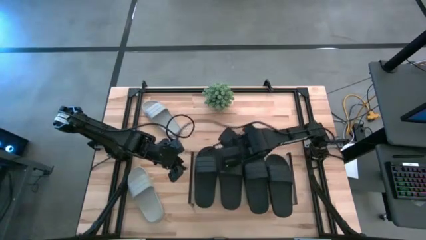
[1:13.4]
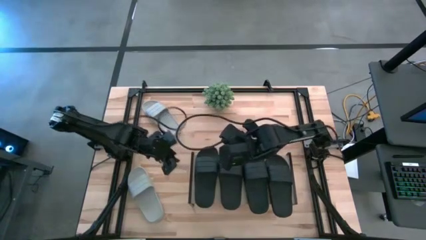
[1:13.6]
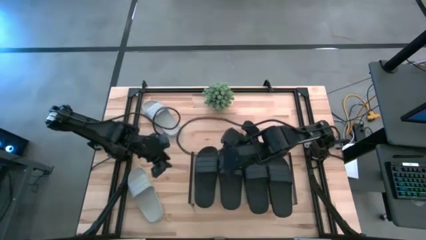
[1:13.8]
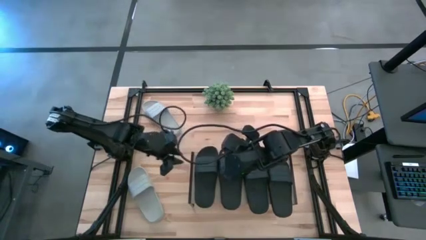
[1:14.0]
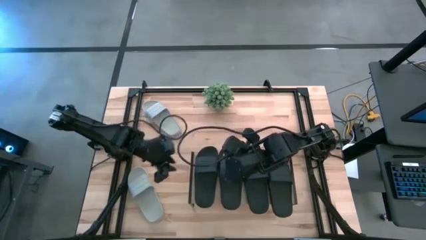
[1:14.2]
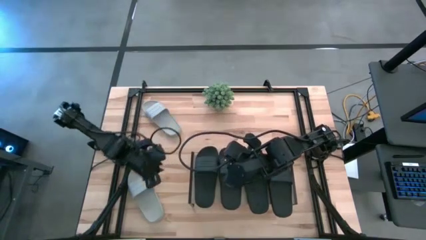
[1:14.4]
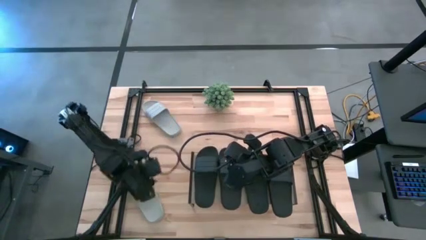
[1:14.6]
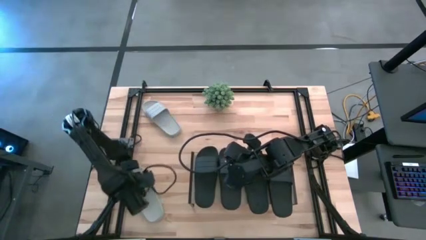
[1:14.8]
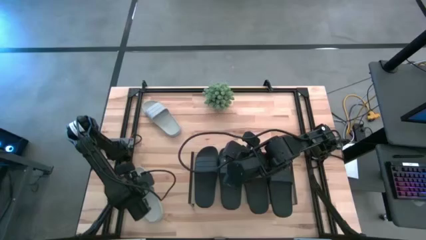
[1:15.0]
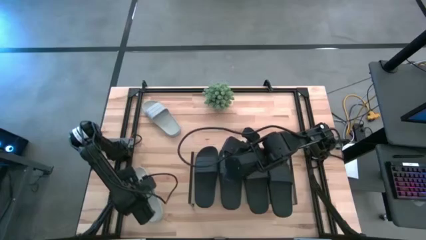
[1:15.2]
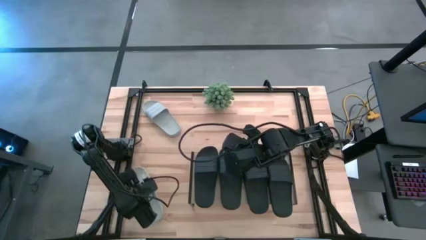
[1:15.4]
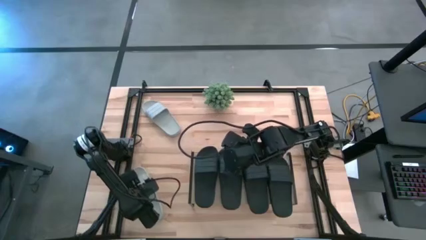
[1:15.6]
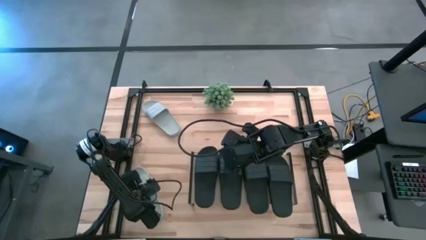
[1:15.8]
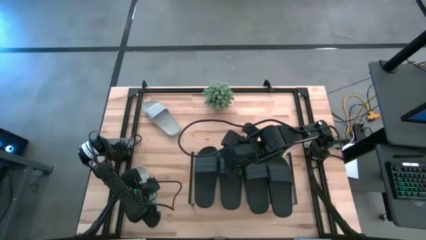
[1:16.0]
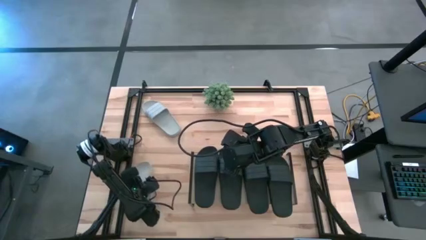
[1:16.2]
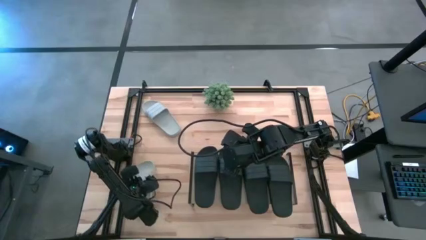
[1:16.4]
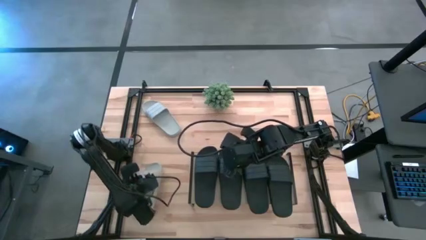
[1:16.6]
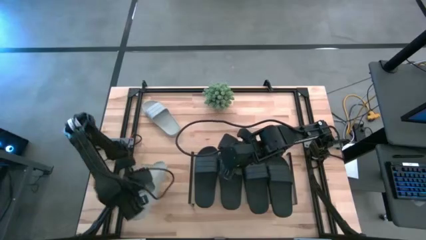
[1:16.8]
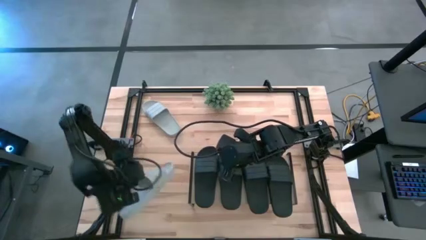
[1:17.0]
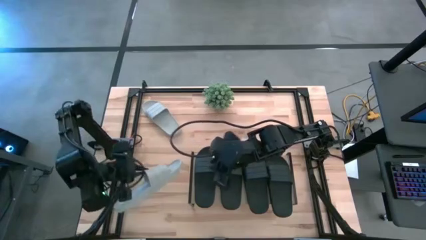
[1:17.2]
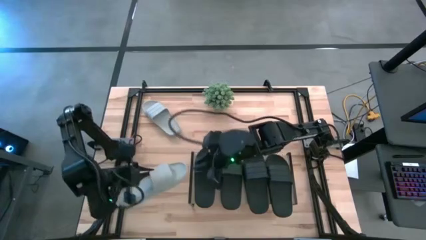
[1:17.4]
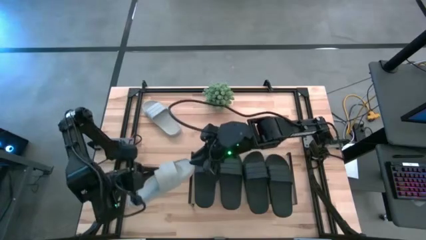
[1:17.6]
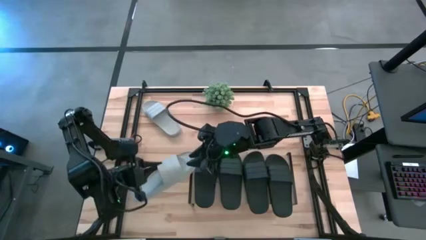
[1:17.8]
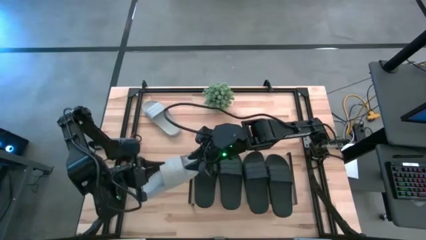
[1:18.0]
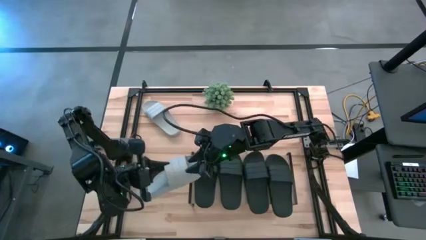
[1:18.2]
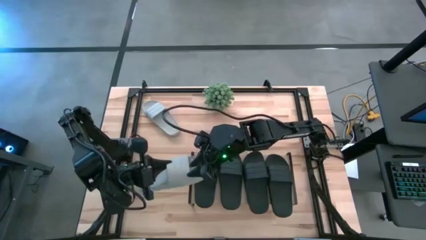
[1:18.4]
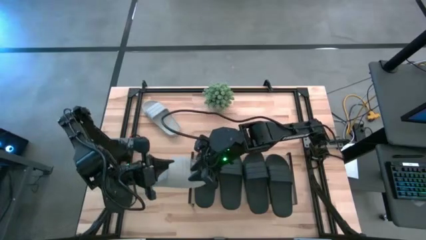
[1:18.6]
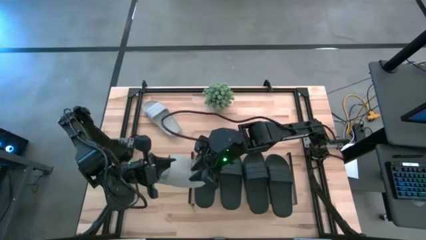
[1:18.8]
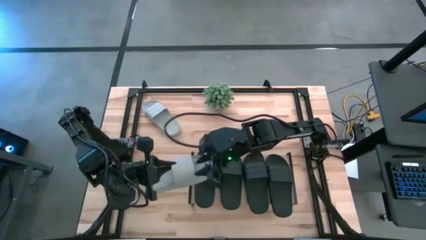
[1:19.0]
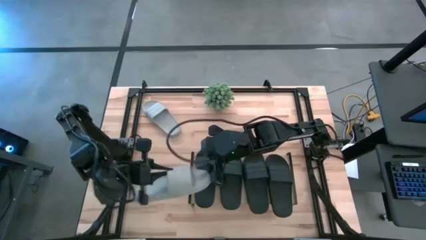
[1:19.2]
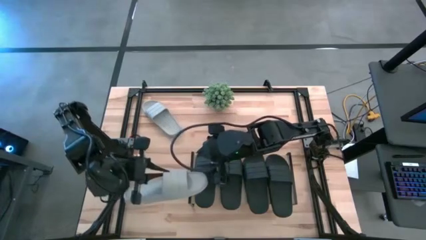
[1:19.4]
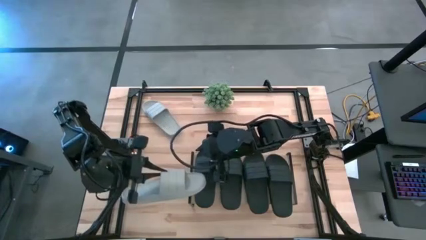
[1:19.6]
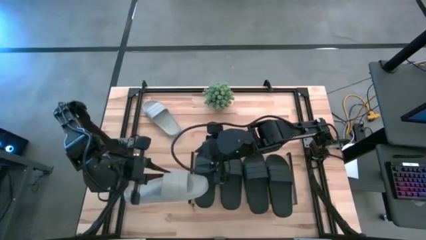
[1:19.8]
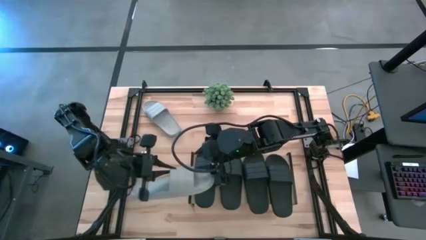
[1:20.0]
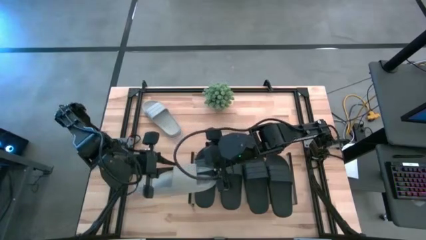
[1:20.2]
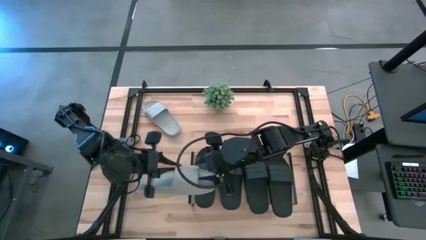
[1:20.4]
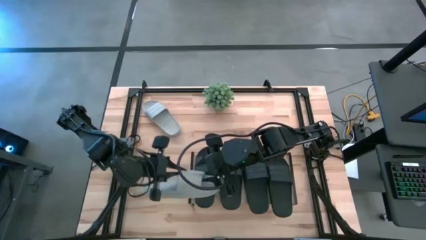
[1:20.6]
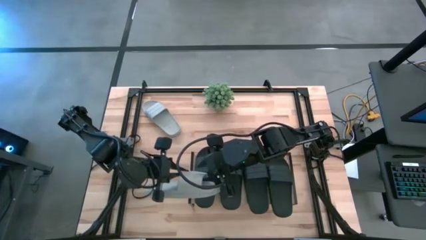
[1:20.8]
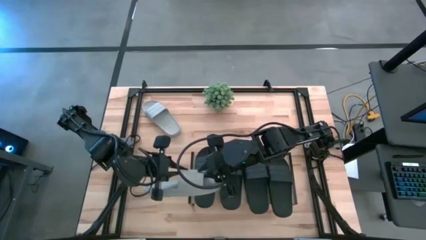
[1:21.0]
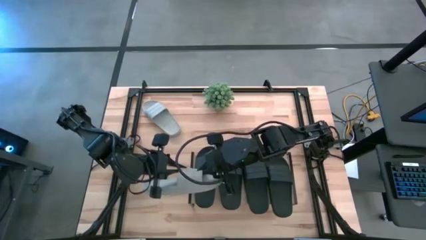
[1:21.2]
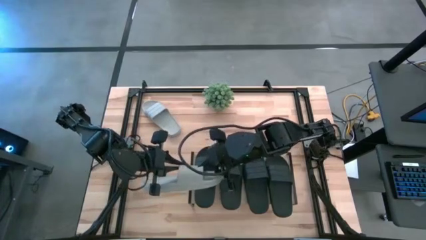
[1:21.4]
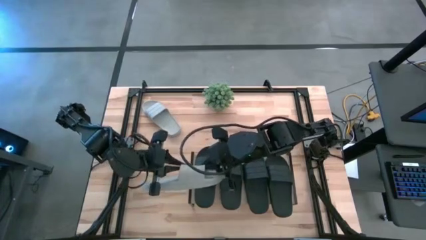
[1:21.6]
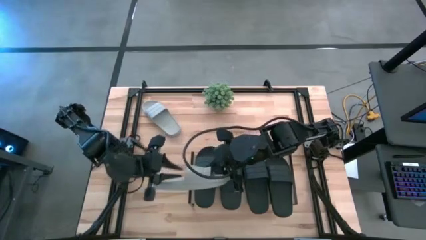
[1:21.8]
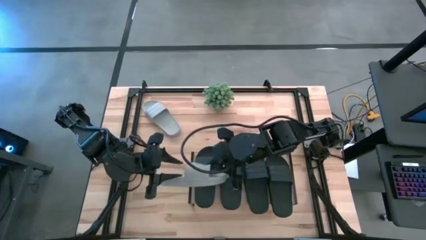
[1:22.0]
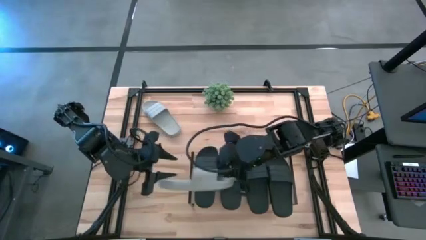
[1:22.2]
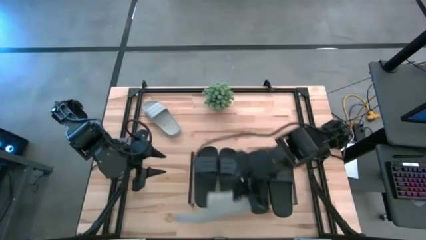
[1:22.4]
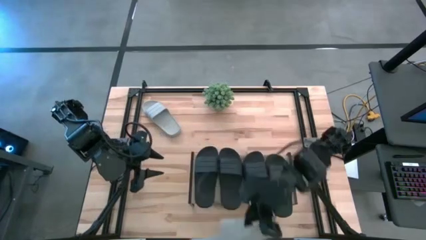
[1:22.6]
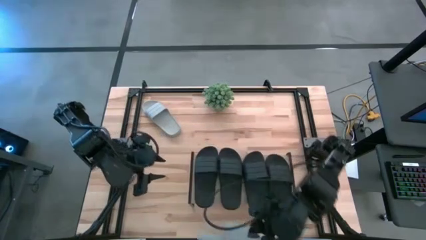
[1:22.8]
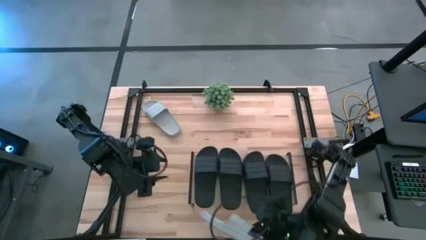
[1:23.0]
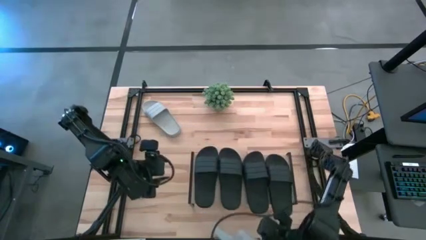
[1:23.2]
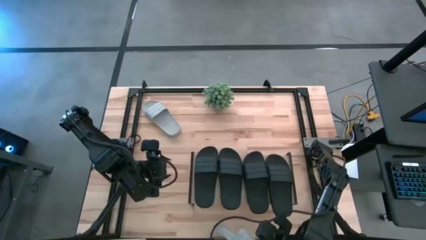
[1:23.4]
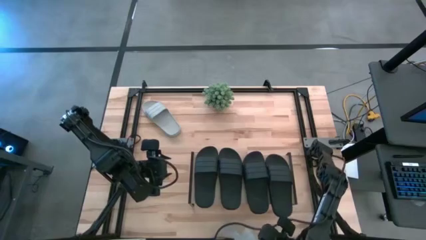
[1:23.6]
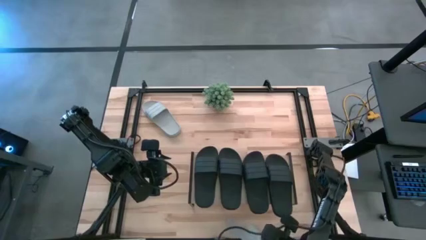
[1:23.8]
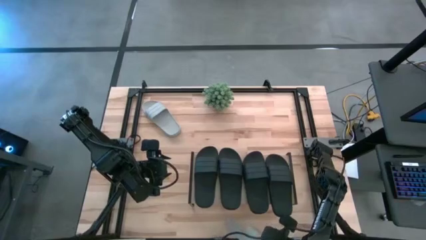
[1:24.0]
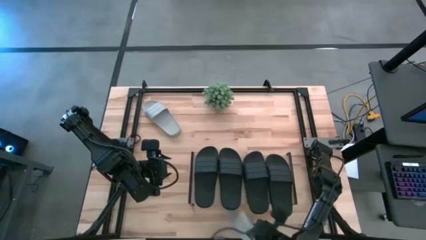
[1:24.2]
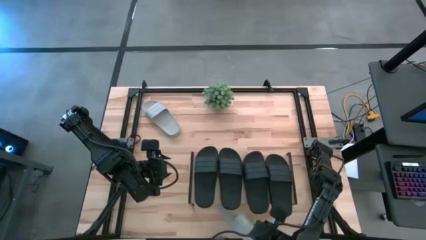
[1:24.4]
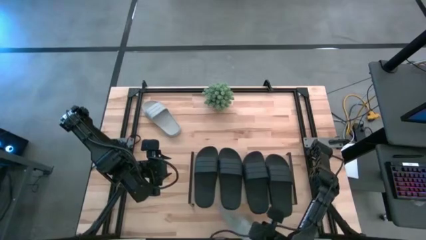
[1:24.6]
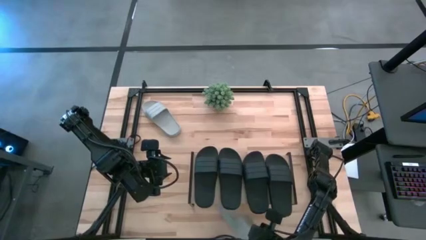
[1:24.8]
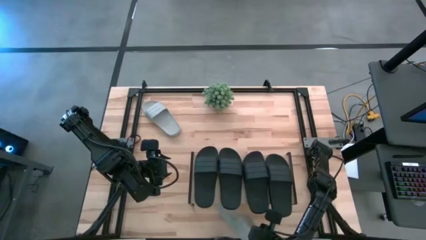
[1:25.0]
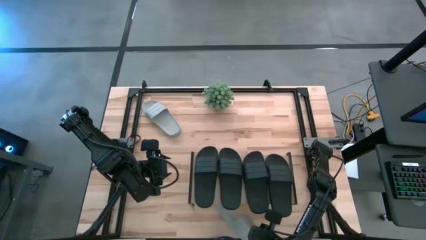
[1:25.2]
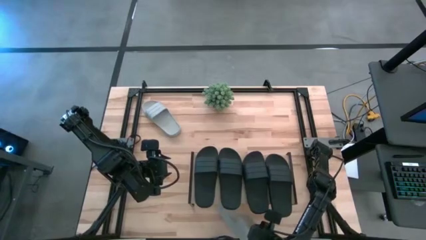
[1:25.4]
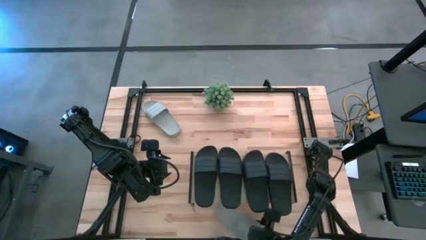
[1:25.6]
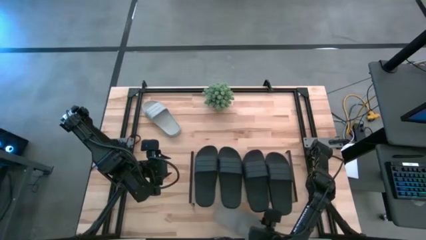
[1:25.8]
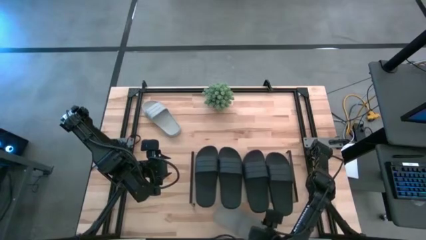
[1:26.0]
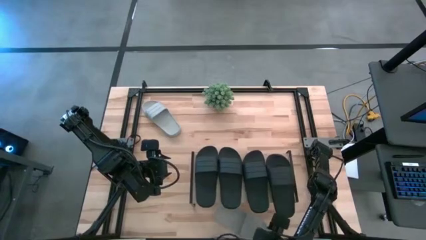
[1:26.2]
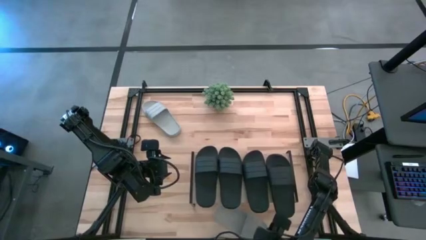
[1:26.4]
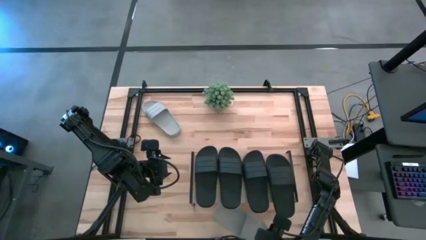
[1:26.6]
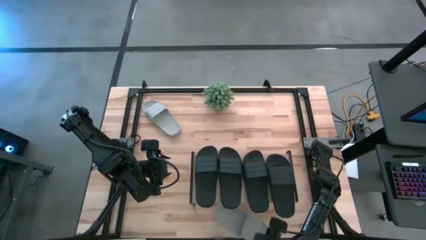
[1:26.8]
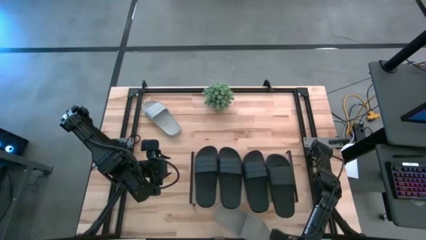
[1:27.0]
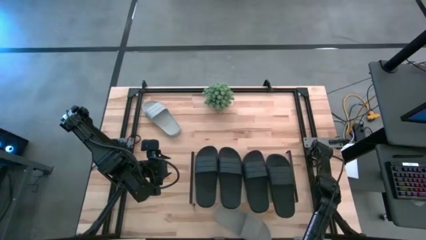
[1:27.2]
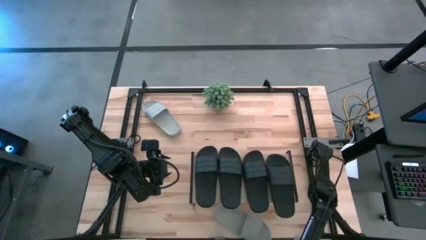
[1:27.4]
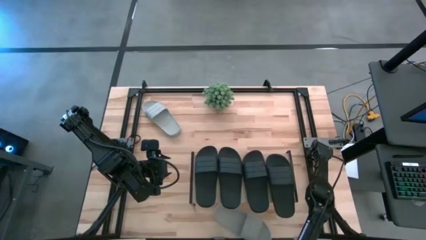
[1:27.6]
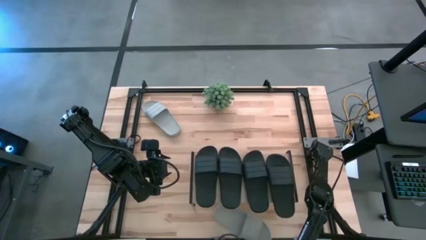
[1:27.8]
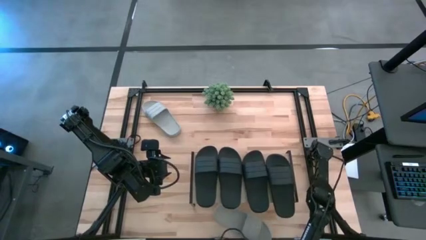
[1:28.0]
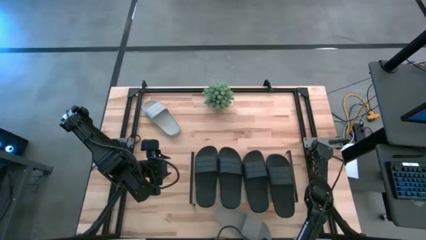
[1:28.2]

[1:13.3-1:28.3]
Task: Pick and place slides into the shelf
Put the white slipper under the shelf
